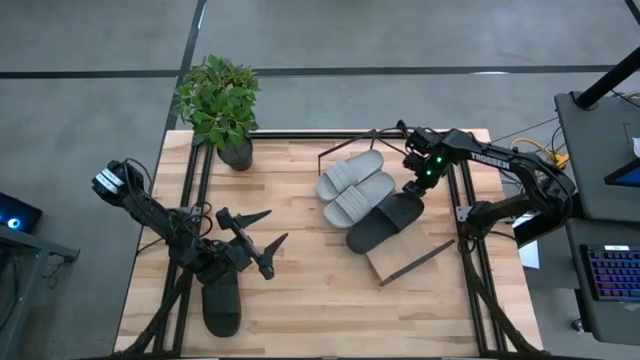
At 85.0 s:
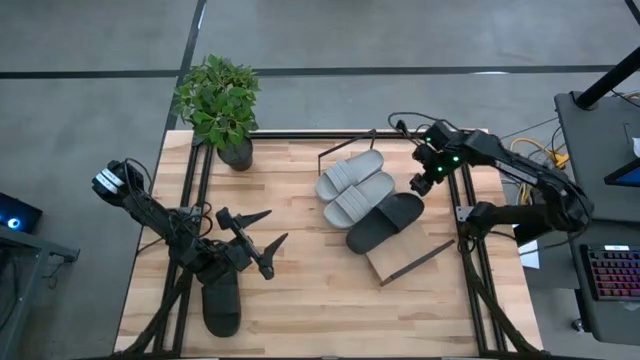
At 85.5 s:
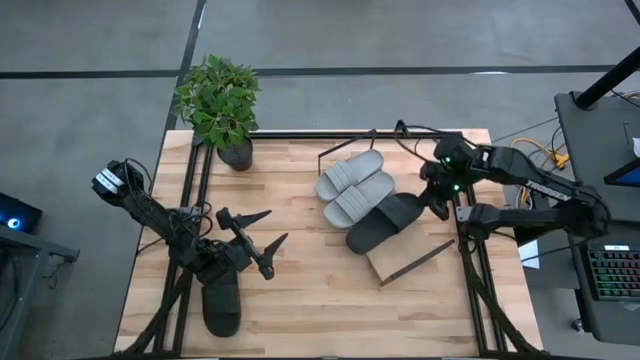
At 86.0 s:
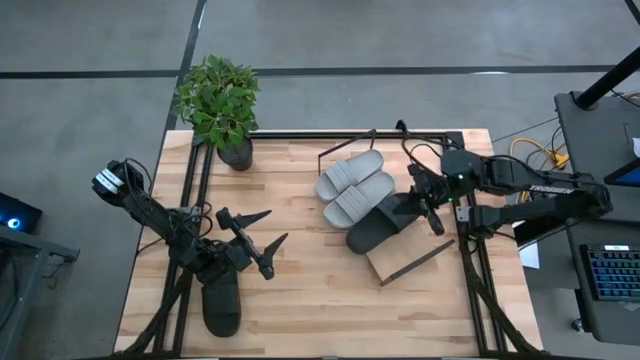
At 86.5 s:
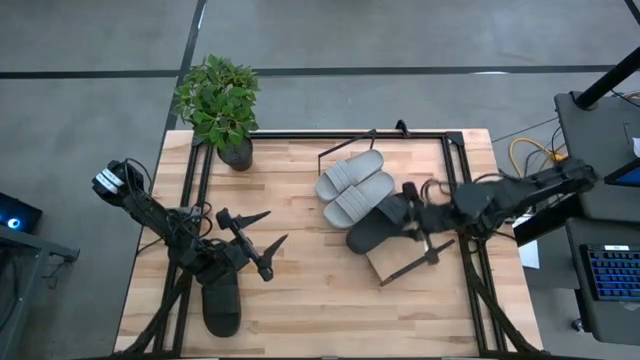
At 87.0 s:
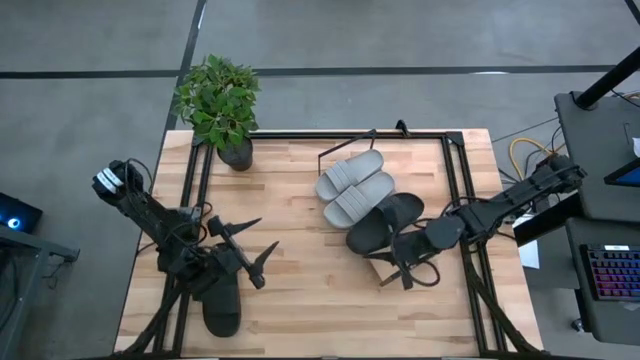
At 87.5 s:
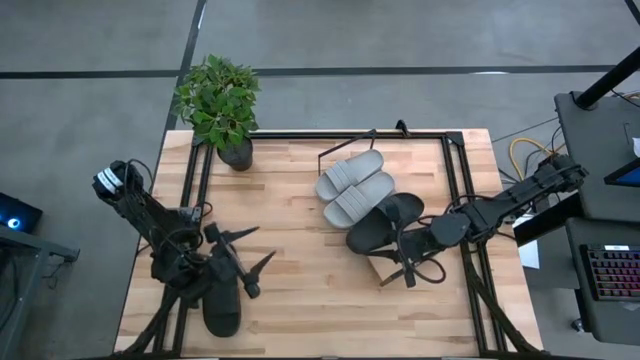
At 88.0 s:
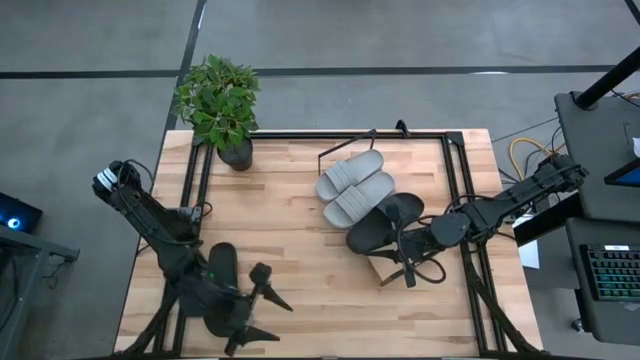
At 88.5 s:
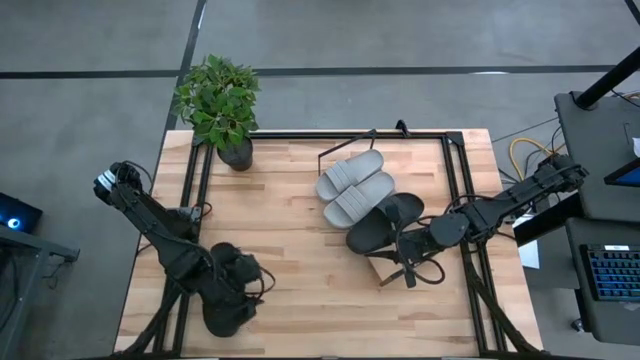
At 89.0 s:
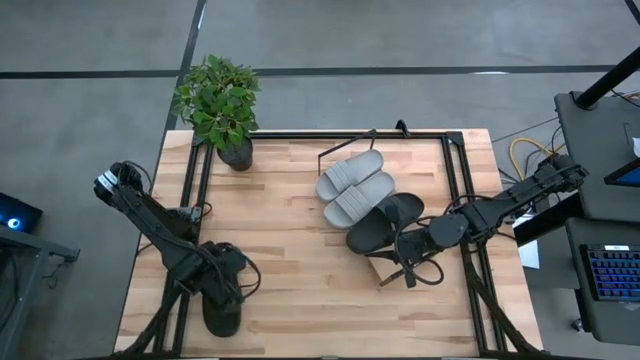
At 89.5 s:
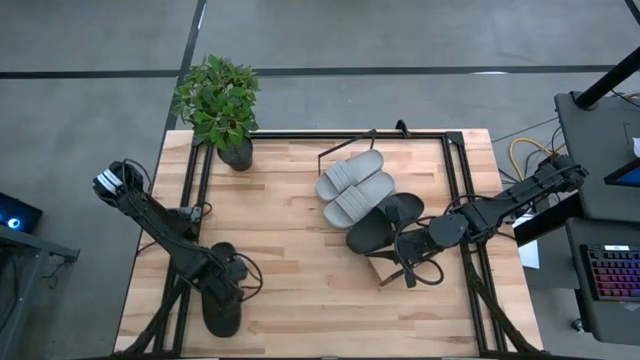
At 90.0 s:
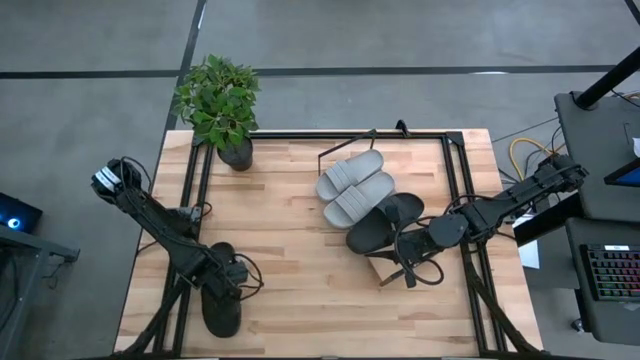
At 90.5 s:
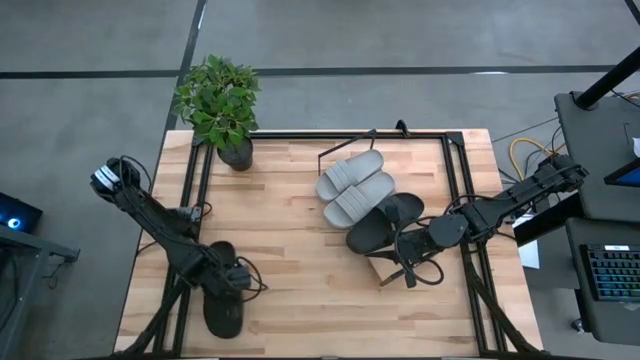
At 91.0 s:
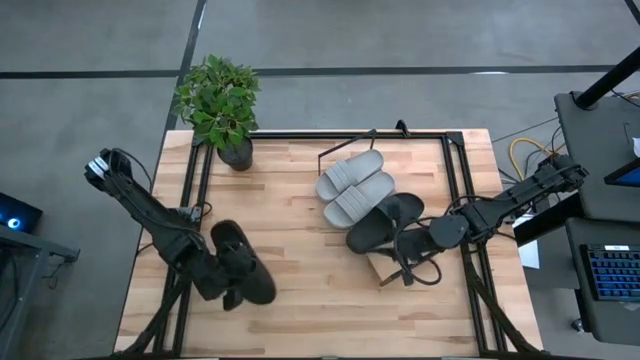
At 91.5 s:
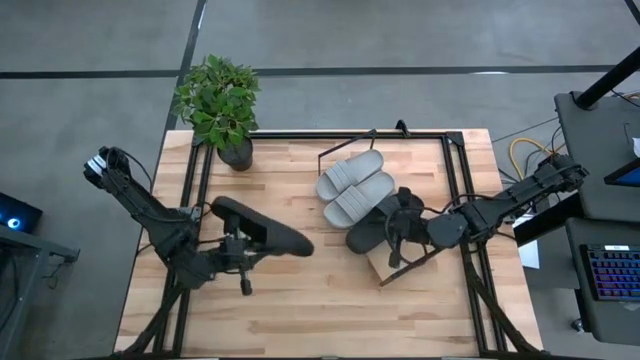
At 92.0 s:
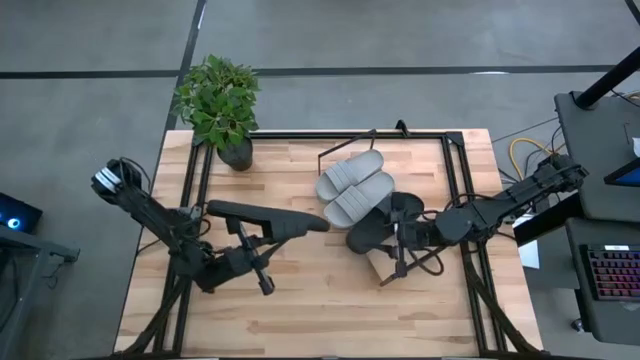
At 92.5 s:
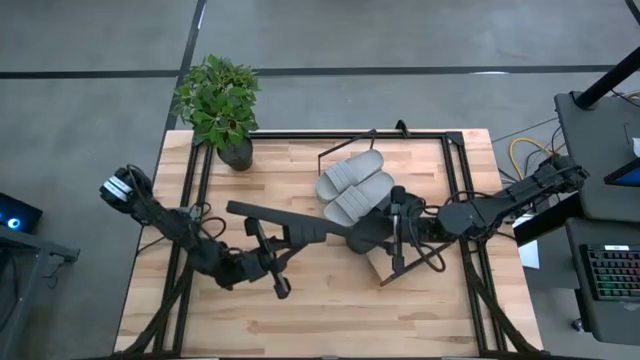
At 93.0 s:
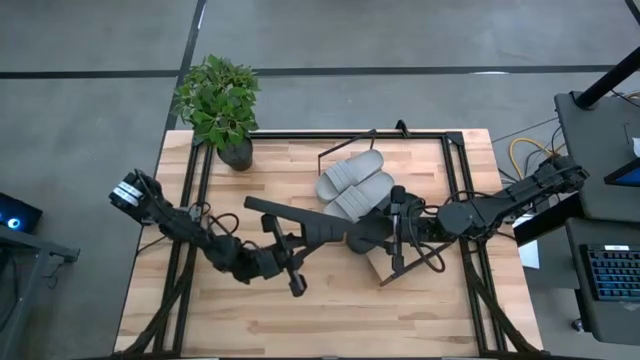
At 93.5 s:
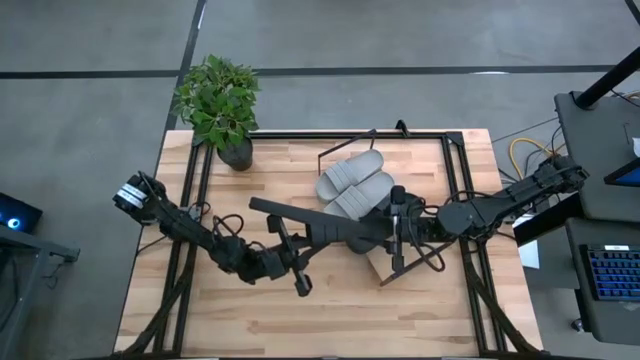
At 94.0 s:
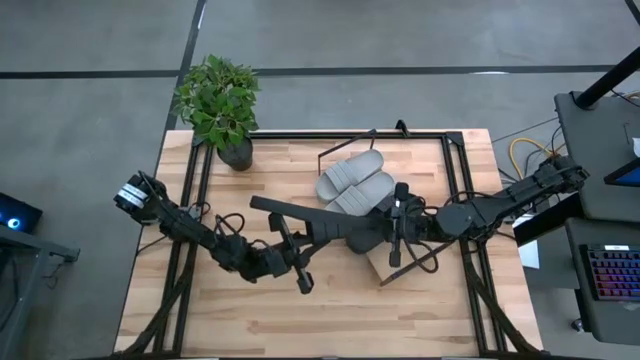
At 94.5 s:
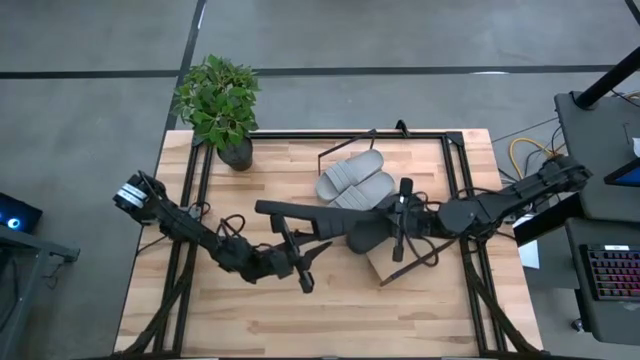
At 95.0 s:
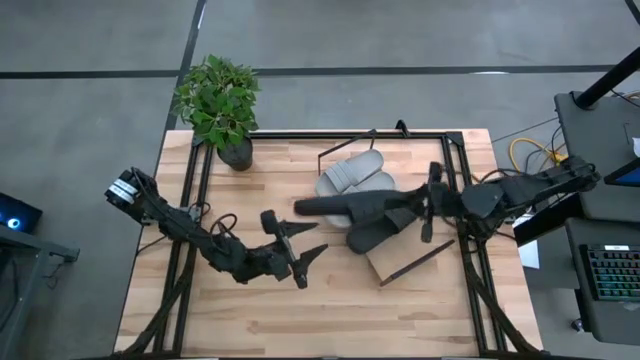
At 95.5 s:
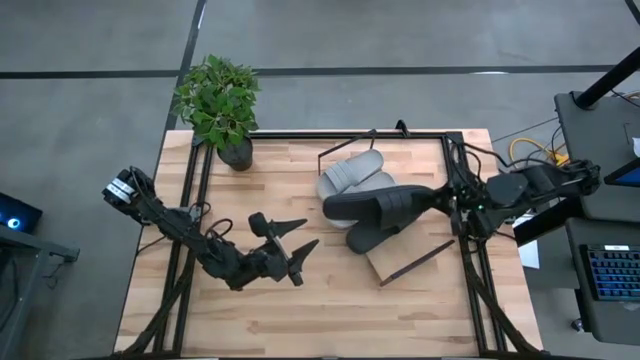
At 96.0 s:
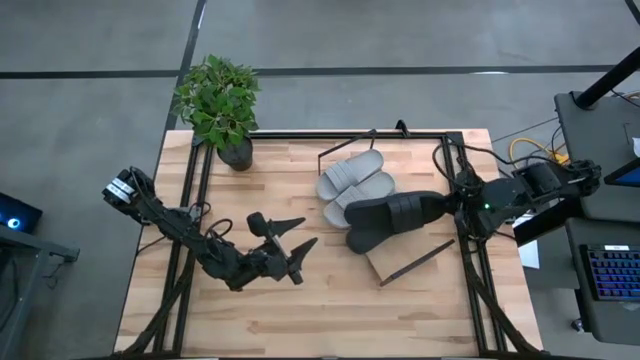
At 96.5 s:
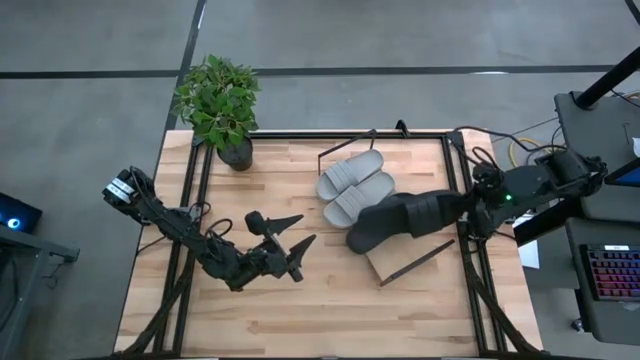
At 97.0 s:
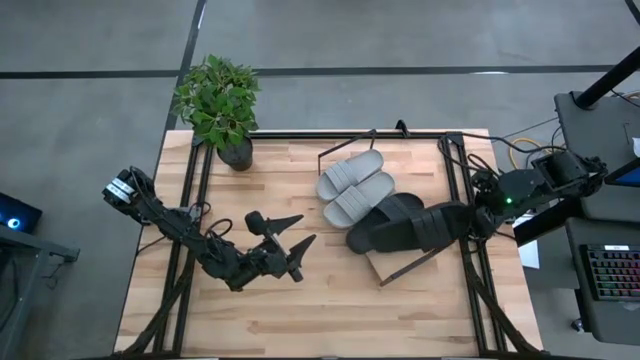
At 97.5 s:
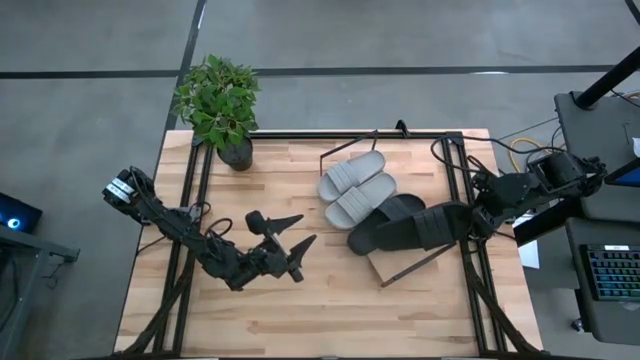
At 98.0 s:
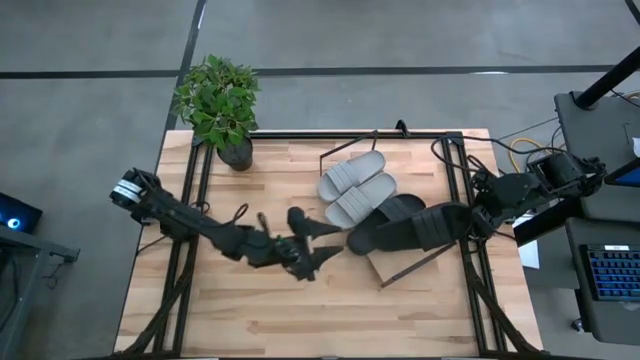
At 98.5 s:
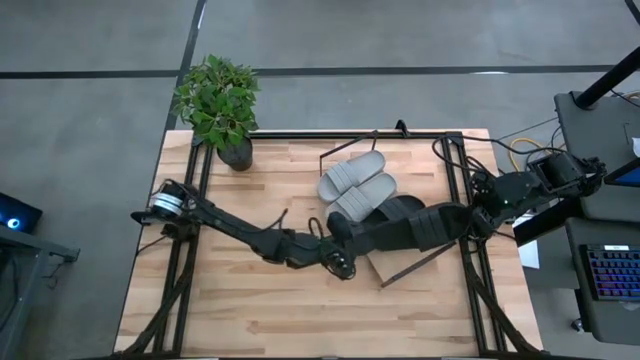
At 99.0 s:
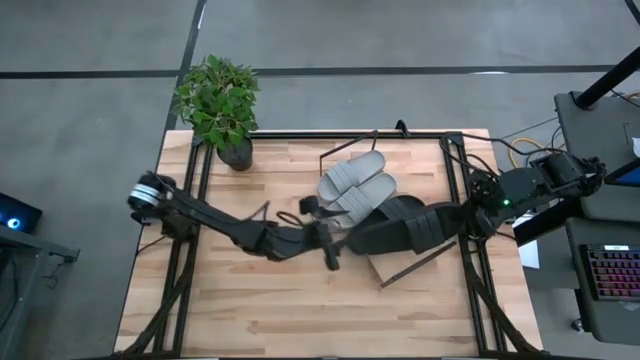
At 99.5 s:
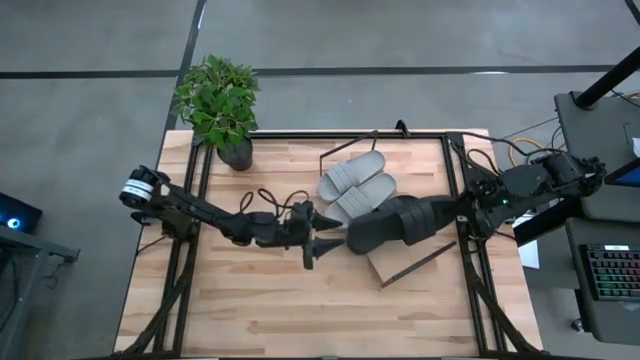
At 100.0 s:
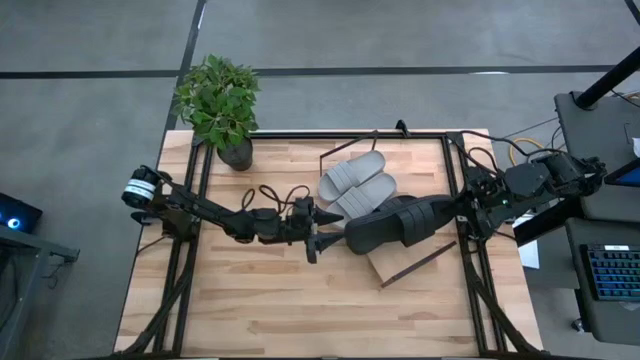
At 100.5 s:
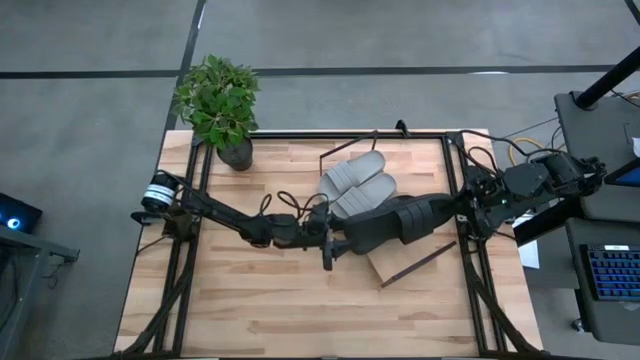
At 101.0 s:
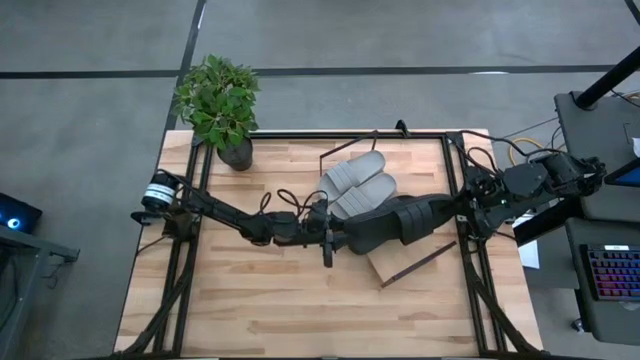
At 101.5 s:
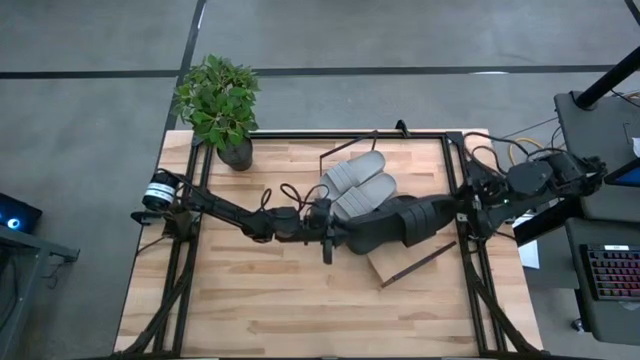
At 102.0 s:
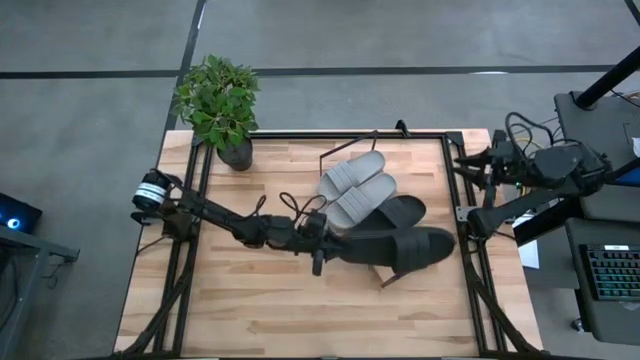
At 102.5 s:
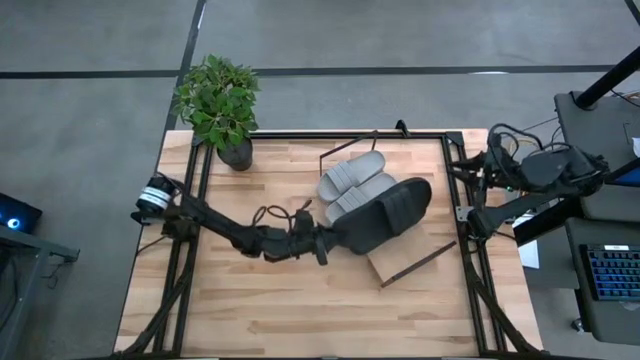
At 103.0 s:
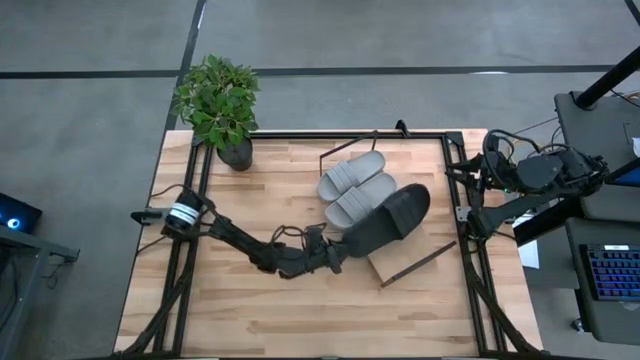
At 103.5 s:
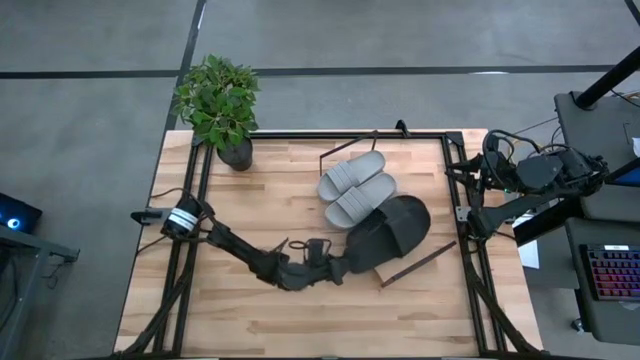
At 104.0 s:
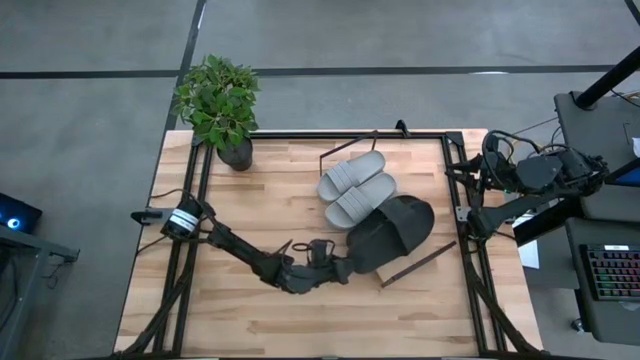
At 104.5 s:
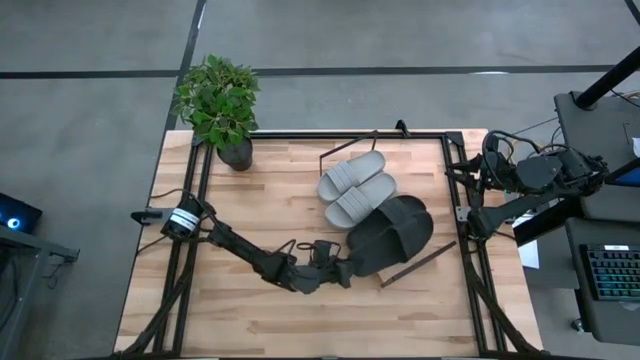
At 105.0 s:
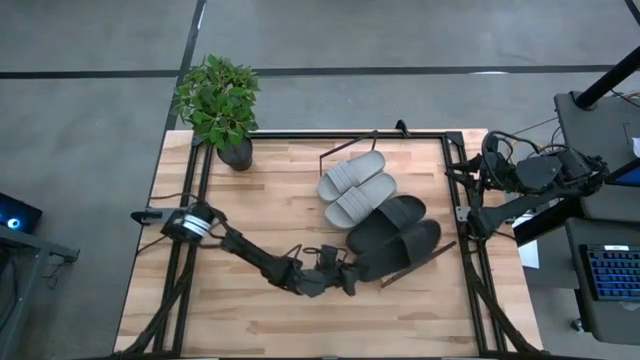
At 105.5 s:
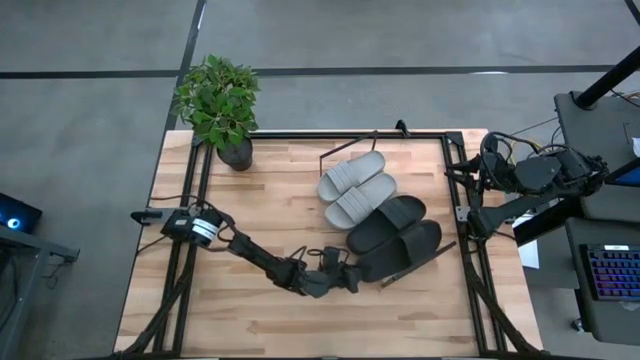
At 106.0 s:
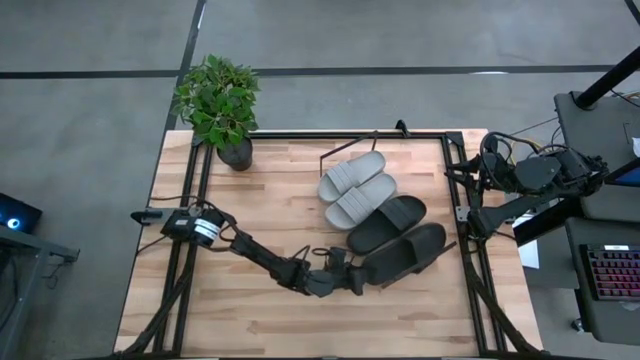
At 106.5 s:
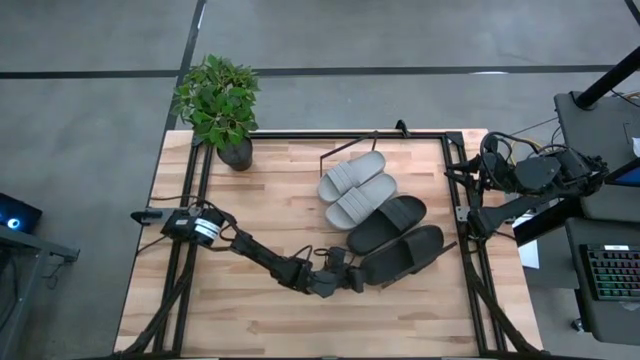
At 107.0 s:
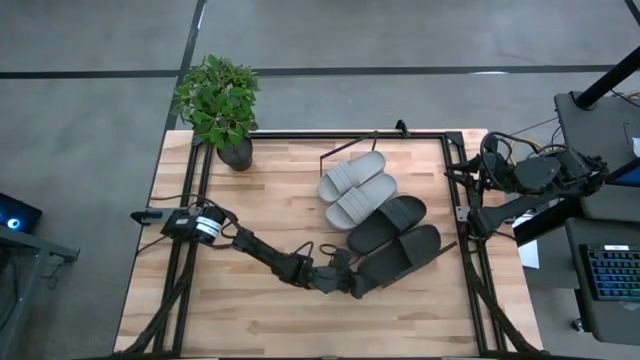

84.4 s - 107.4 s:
Task: Pick and place slides into the shelf
Put the black slide on the shelf
